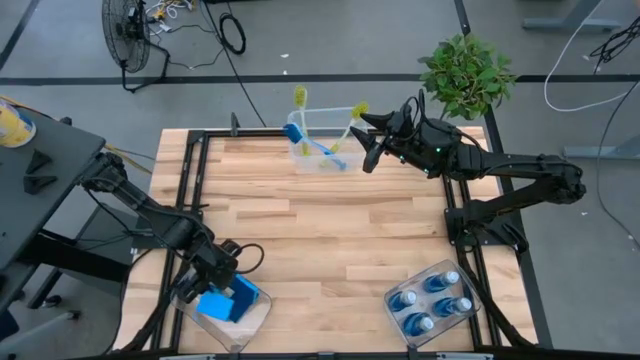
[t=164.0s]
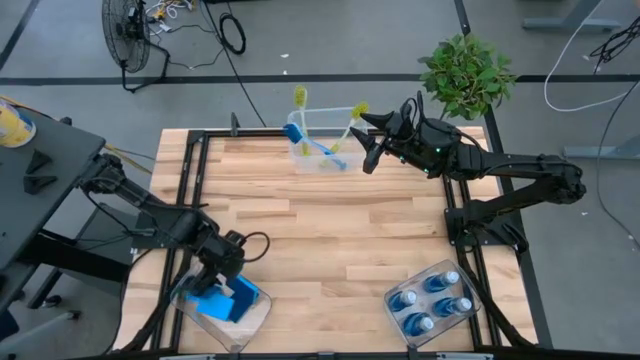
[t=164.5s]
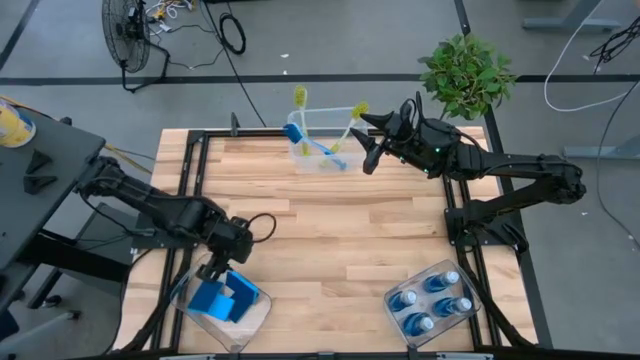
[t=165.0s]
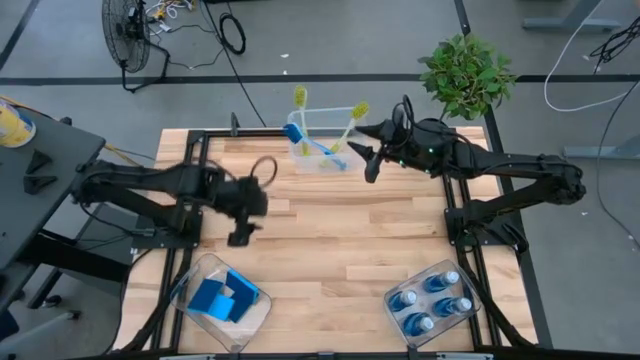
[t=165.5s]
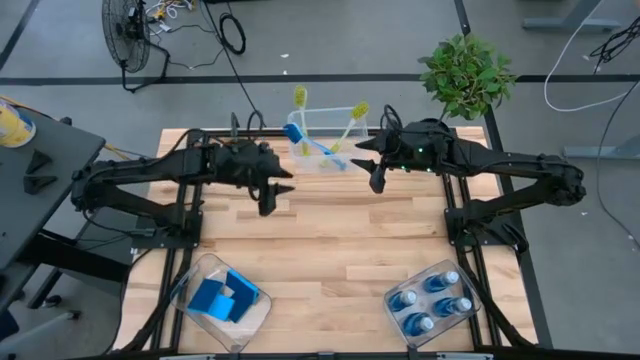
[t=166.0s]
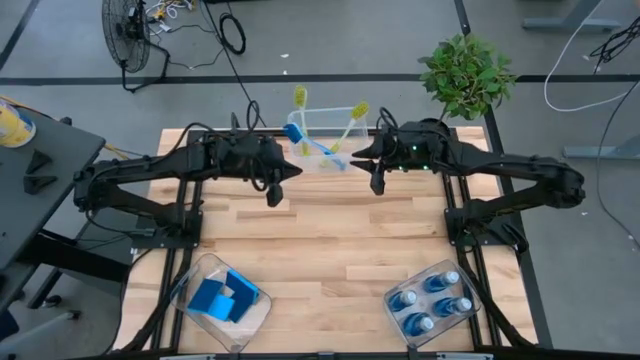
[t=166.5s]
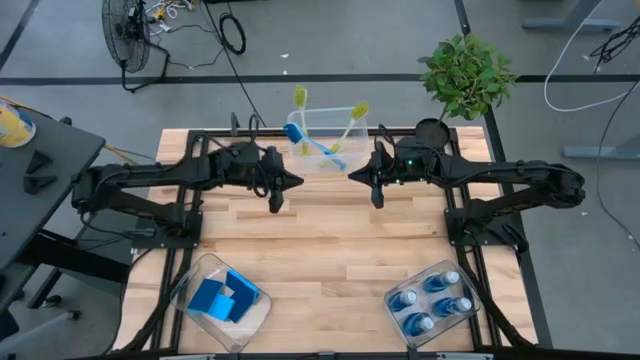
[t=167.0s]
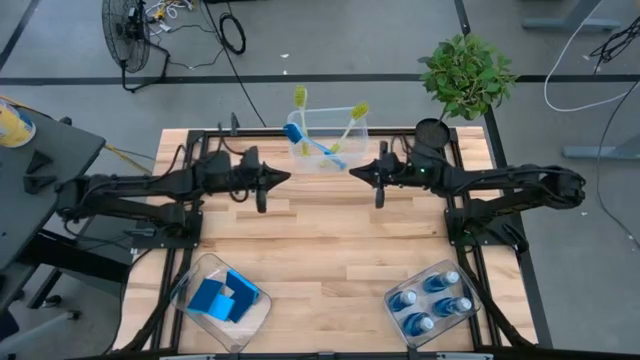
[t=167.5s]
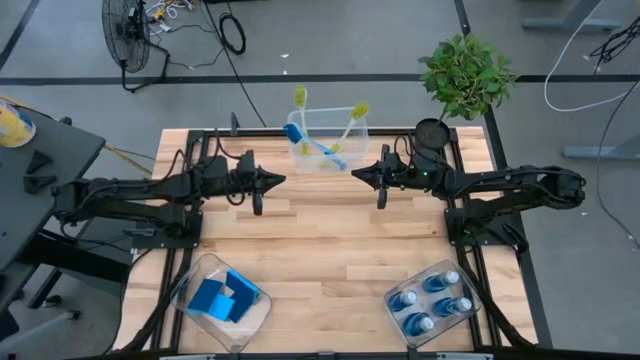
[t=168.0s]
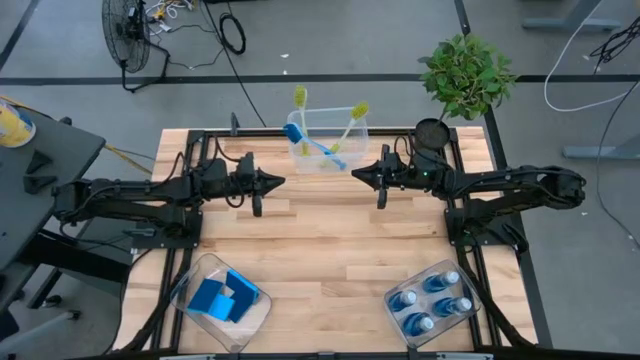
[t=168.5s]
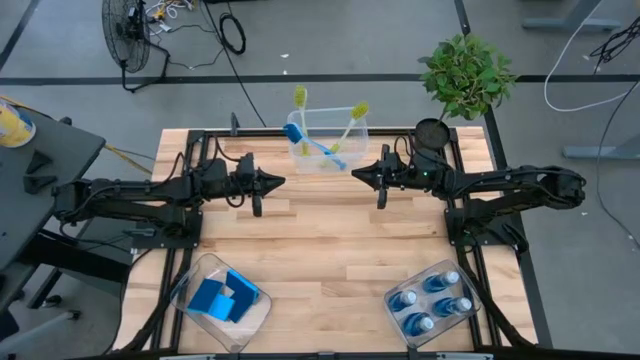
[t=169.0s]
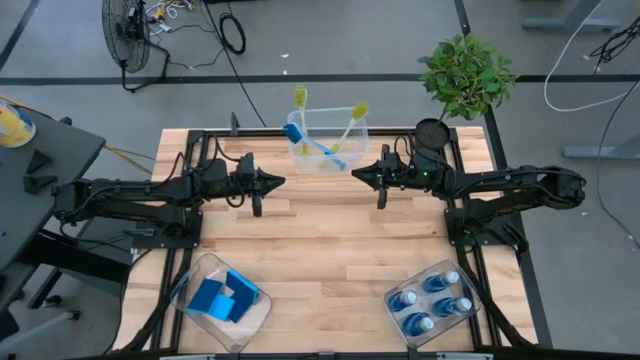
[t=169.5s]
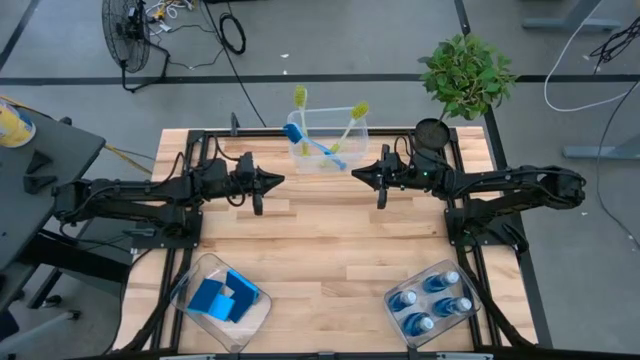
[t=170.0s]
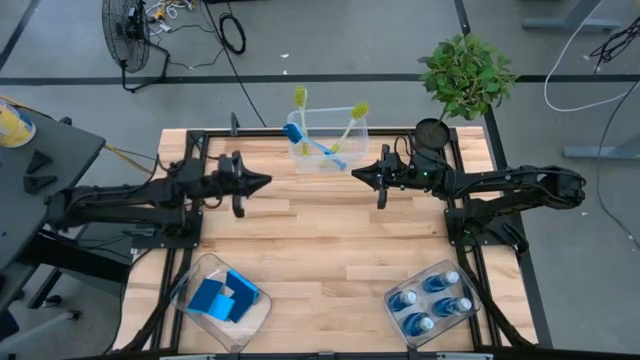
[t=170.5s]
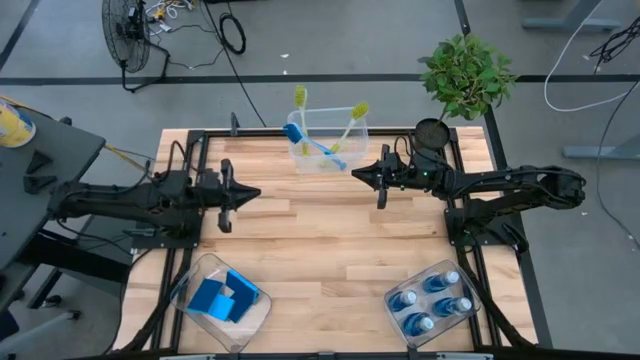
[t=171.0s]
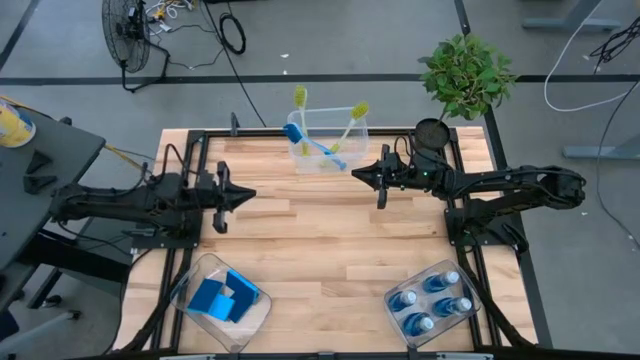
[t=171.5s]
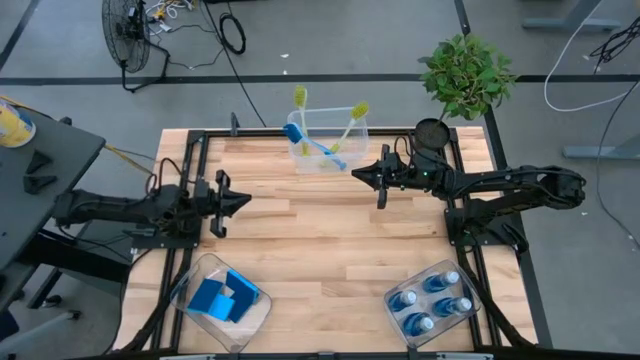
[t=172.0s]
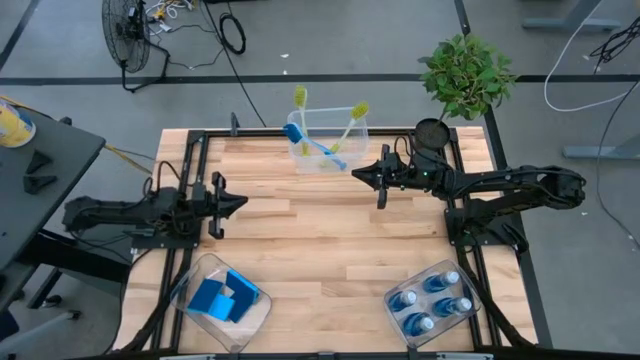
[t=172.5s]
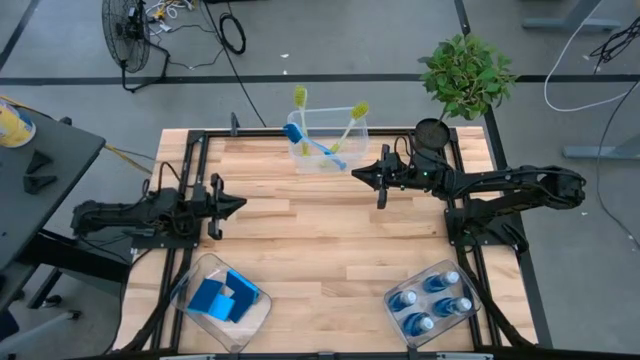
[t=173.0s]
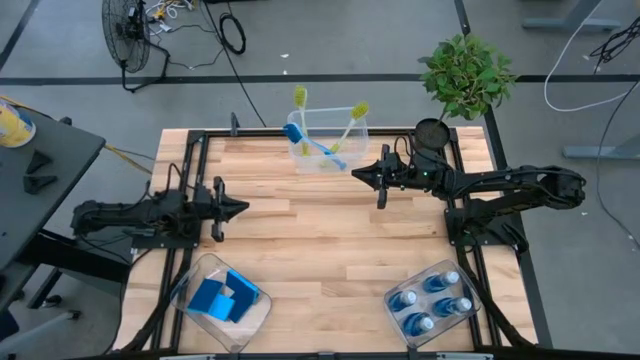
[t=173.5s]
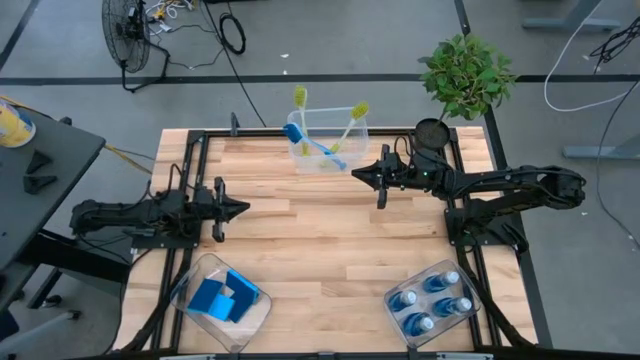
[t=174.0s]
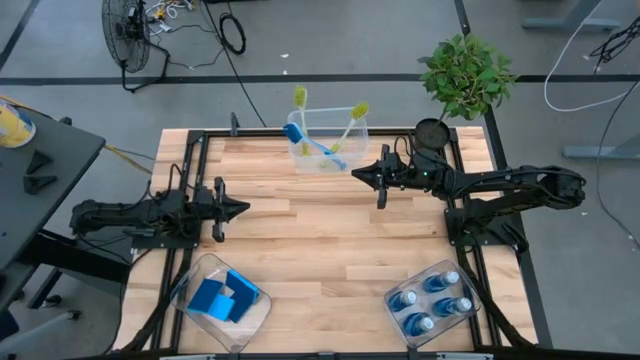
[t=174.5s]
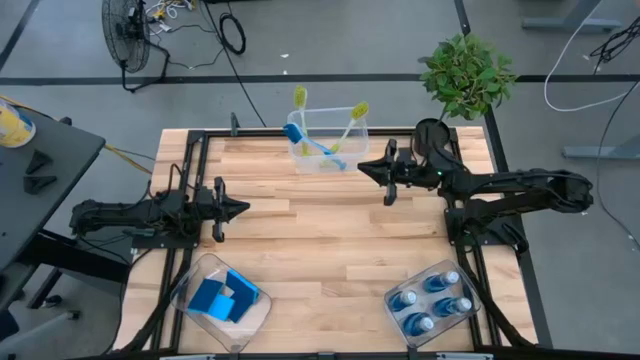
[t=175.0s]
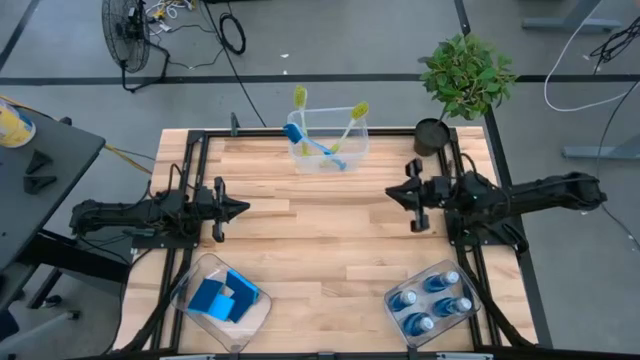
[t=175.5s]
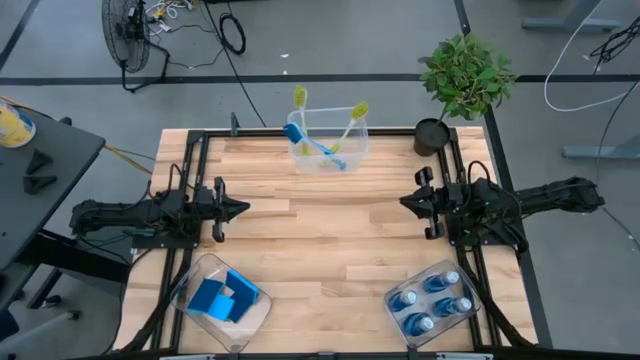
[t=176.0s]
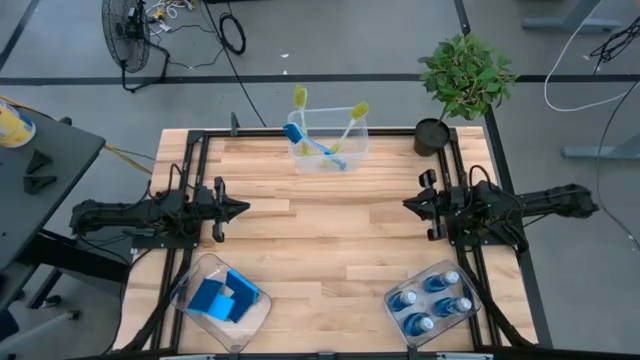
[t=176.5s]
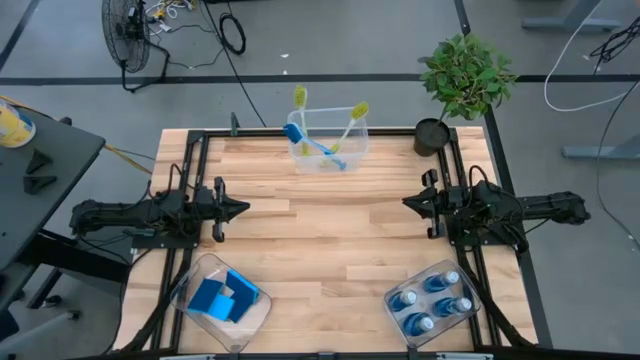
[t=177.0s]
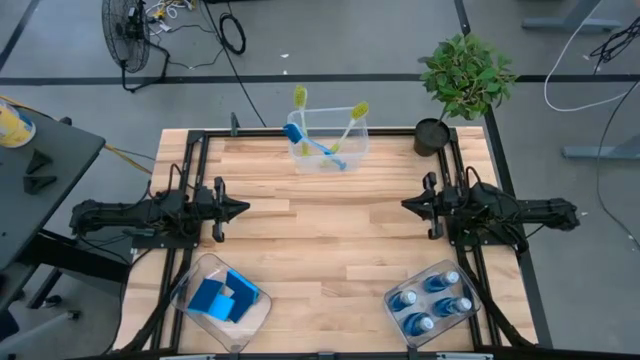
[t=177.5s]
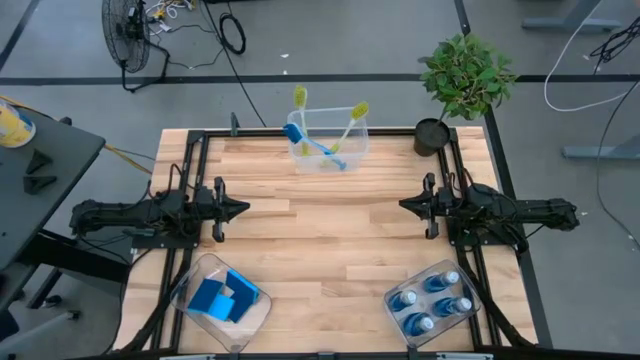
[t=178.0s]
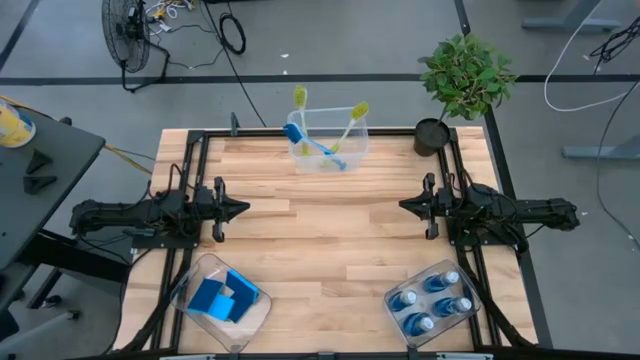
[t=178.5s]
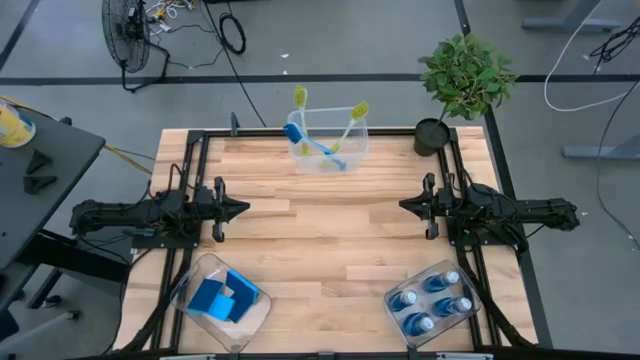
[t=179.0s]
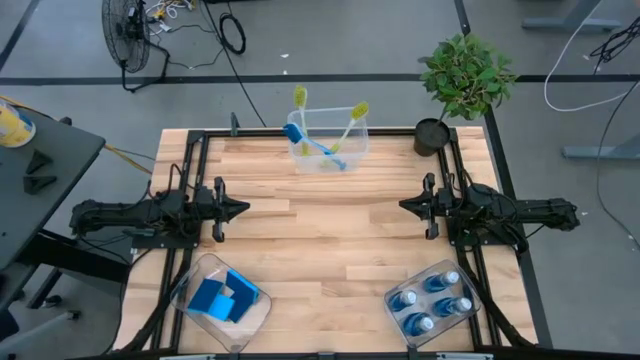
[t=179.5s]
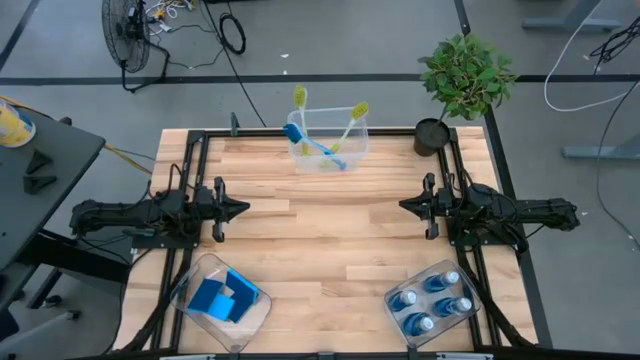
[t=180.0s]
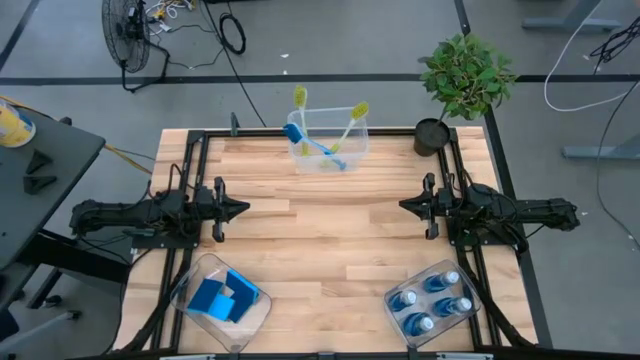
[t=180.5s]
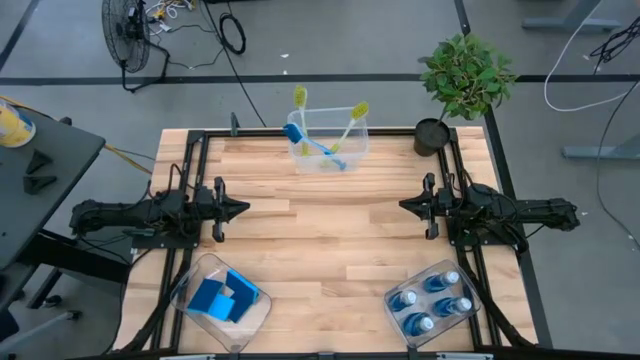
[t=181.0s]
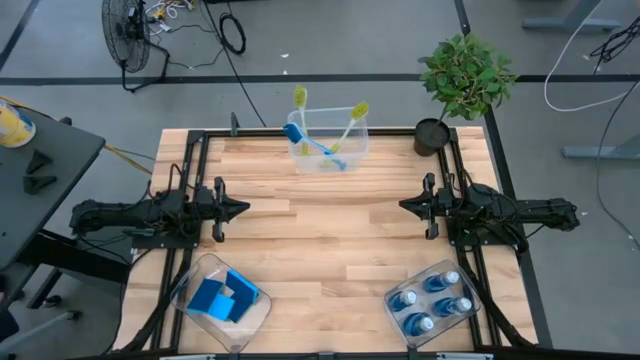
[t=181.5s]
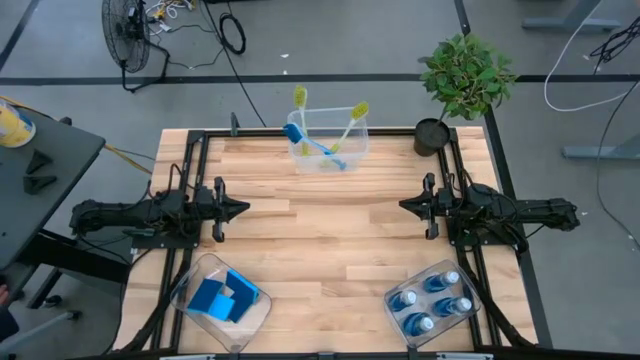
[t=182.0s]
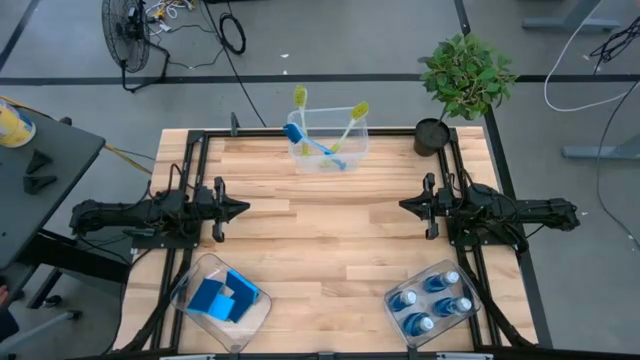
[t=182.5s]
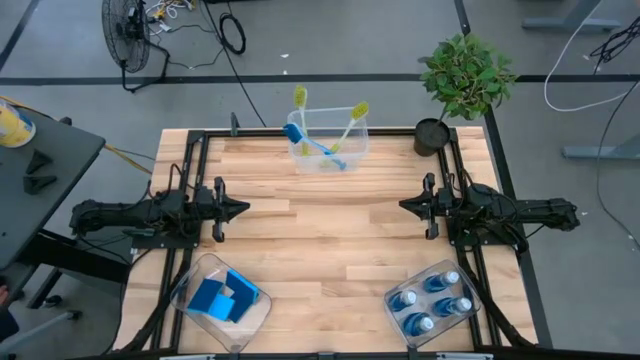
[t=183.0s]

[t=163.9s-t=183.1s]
Task: Pick & Place Kitchen Sink Supplies
Return to Home Position
